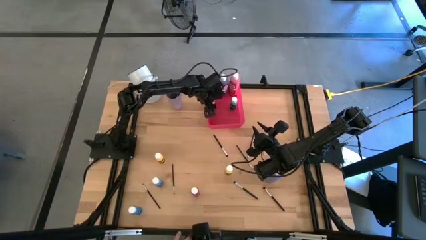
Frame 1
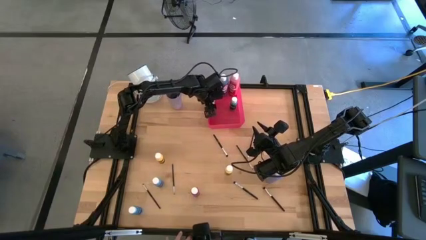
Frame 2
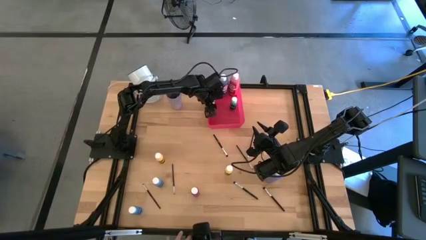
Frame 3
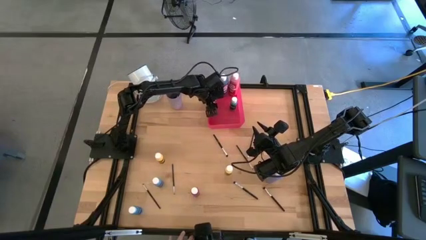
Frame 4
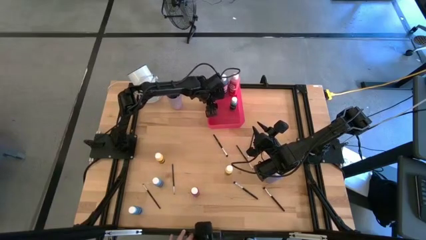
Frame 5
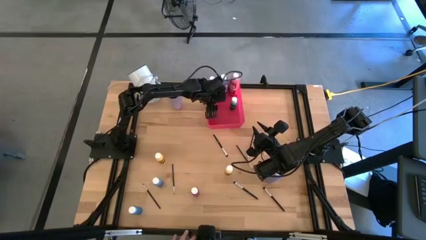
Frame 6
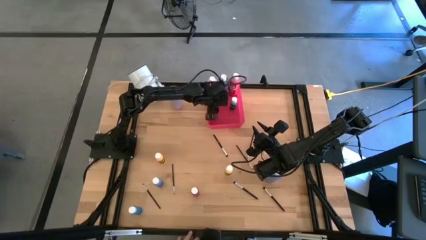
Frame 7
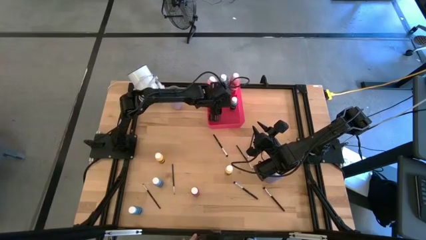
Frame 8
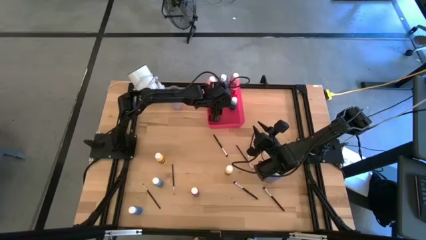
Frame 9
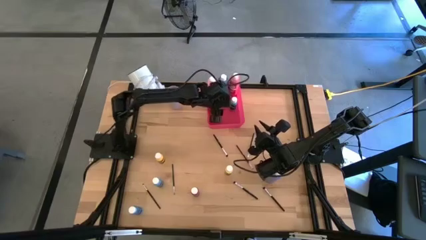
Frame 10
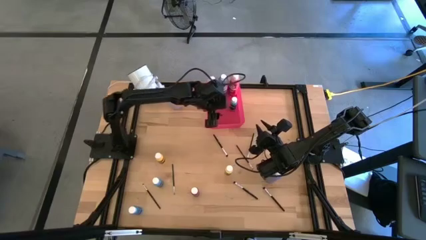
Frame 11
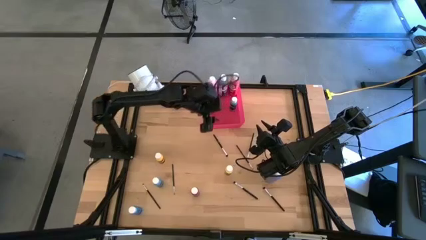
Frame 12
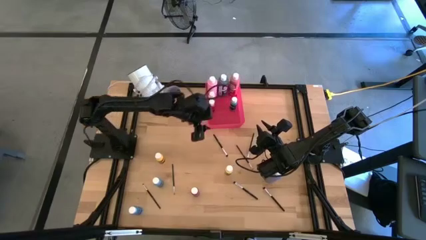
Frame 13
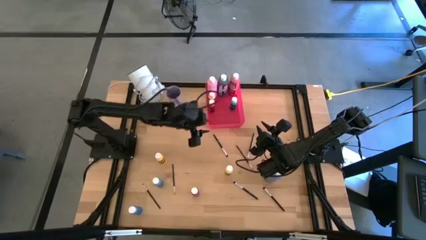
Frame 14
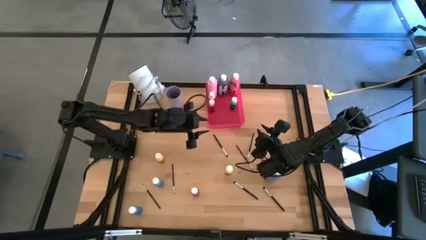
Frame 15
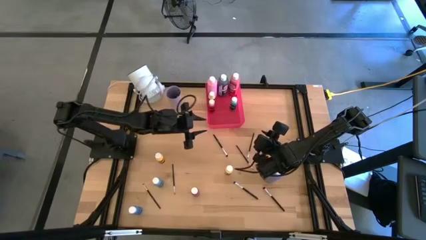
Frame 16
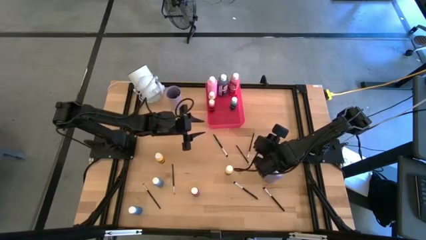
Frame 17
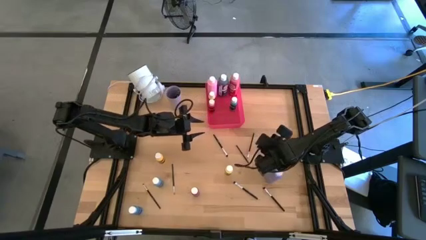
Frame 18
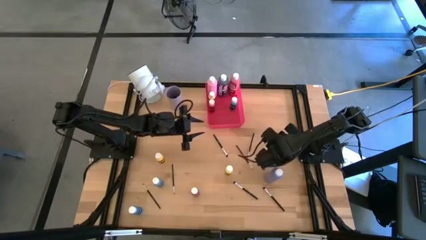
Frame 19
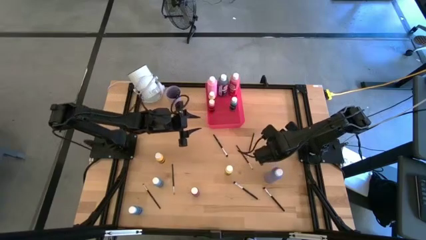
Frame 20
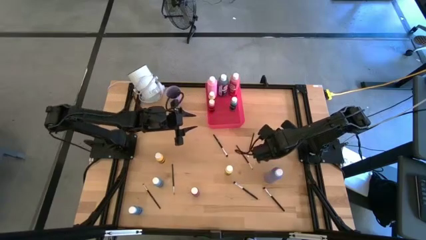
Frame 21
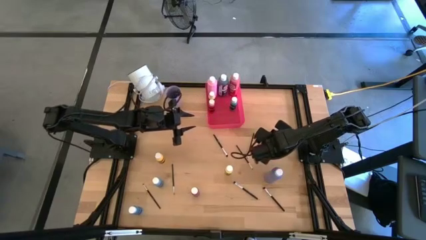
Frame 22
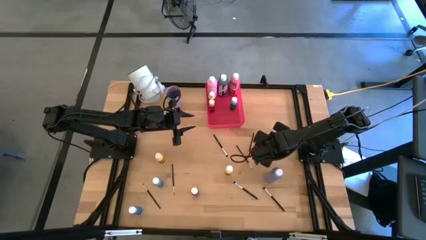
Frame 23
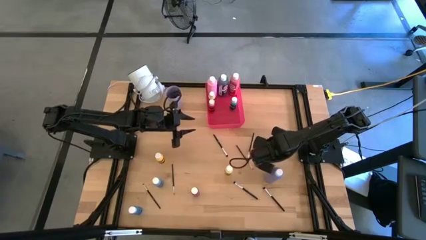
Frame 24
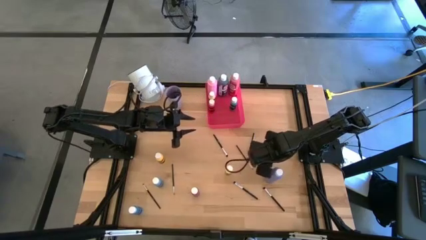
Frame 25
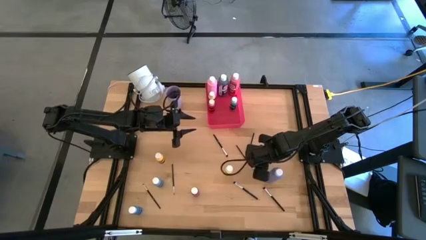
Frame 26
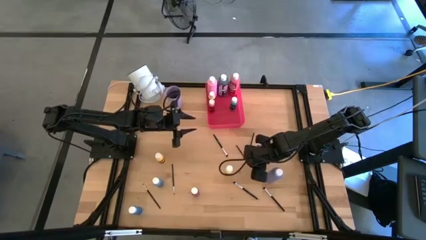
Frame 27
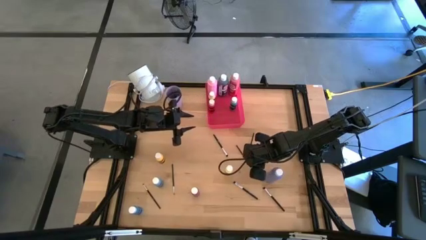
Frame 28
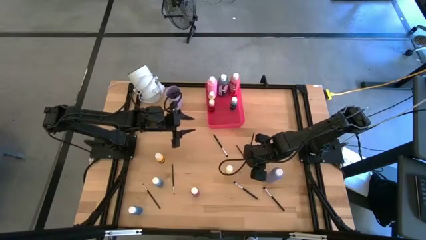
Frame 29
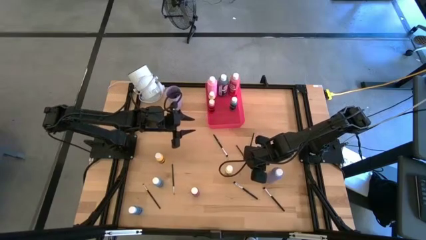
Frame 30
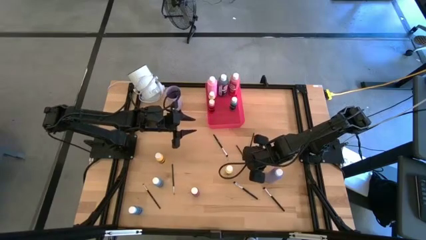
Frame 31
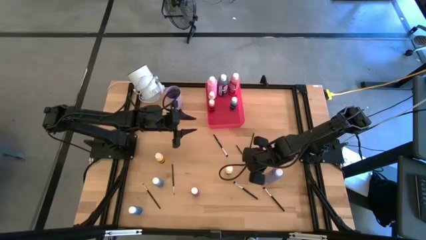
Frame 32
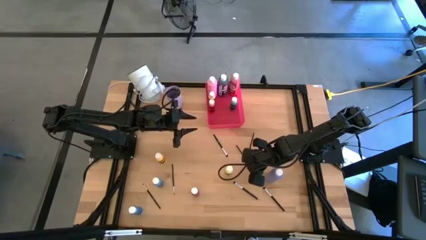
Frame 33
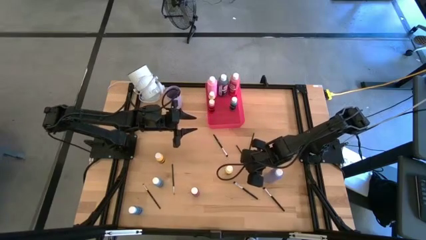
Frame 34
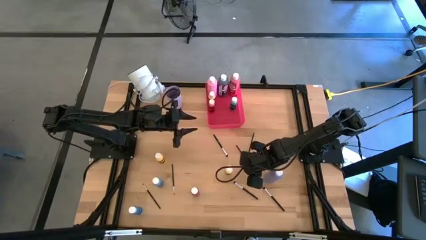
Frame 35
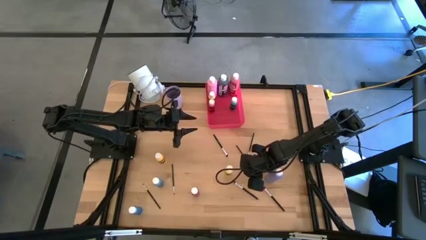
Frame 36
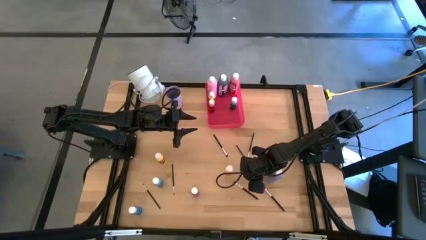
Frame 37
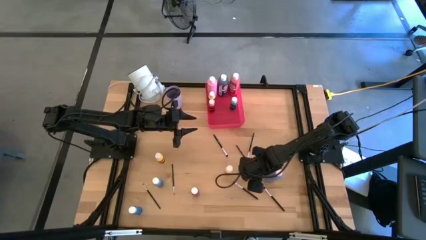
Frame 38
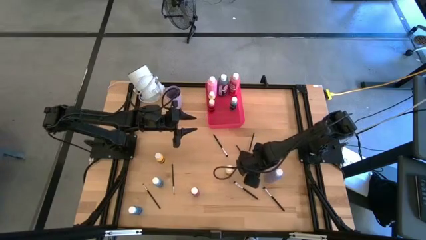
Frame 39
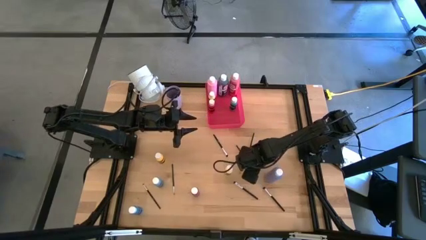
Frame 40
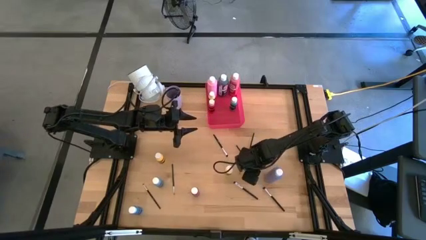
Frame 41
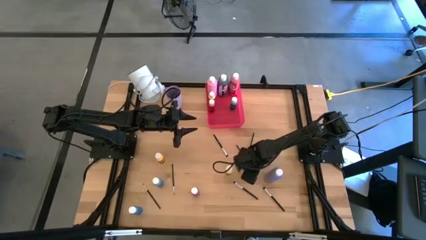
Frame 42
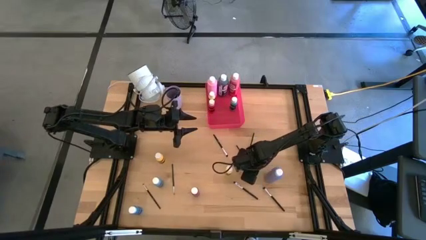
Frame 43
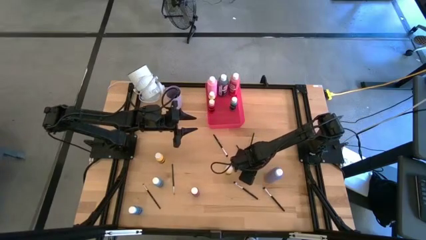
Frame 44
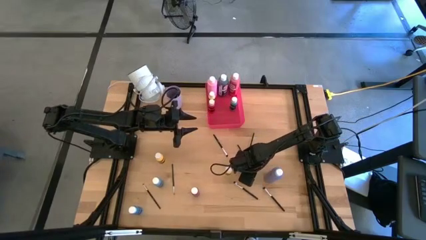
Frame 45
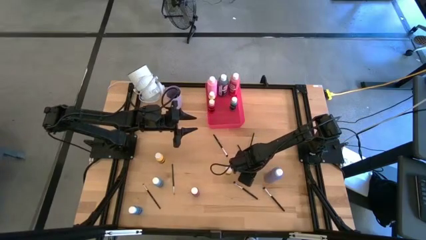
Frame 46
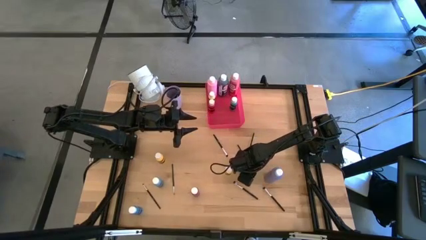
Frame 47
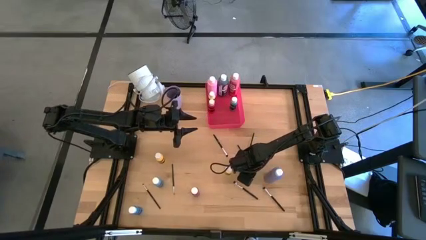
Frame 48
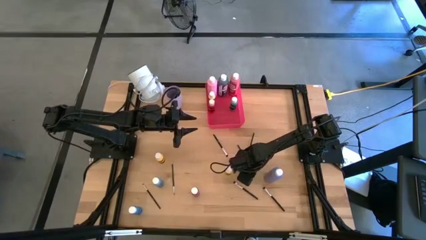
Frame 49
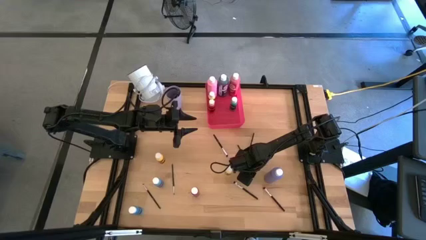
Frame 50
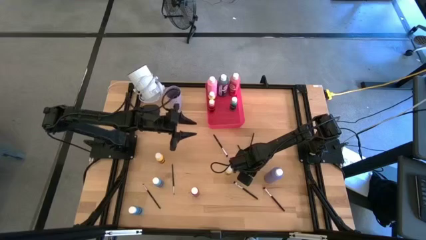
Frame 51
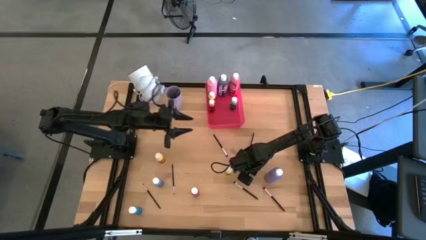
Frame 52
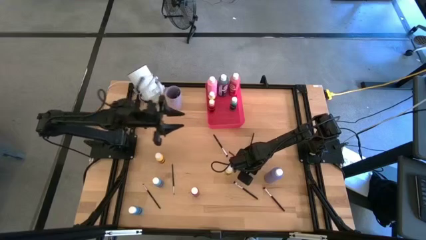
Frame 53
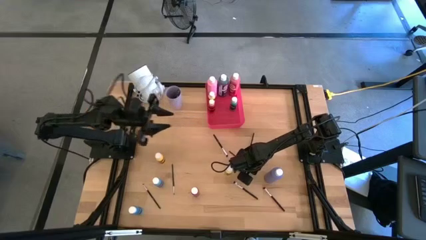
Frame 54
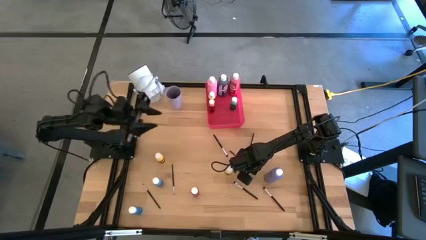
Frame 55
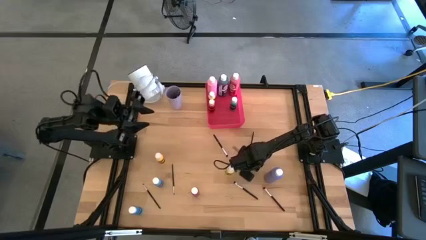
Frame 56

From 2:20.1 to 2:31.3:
Task: Pick & Place Paint Supplies
Put the black paint brush into the purple cup

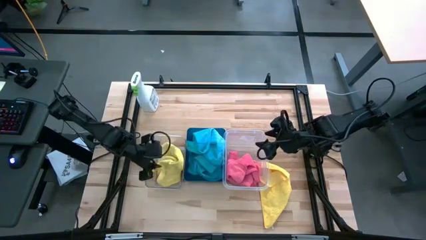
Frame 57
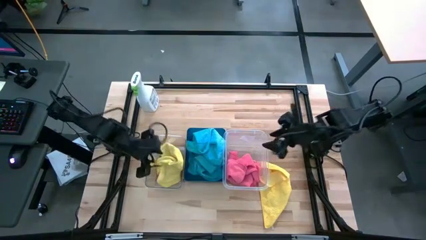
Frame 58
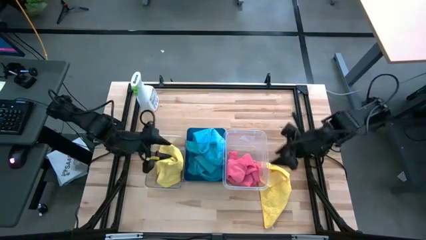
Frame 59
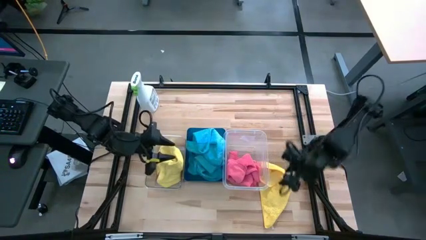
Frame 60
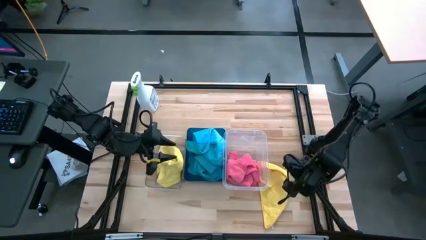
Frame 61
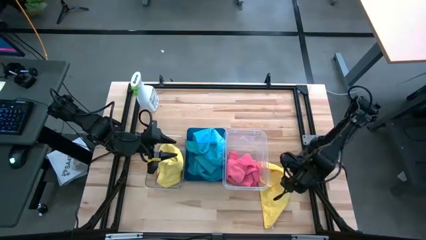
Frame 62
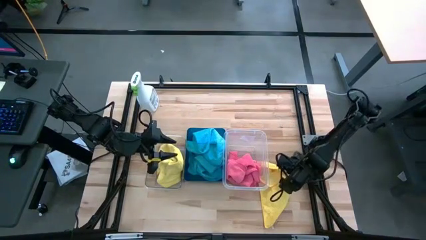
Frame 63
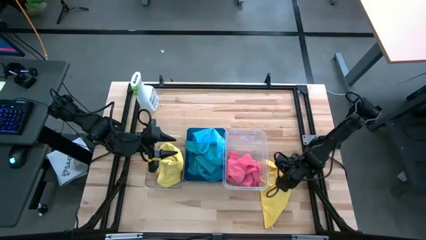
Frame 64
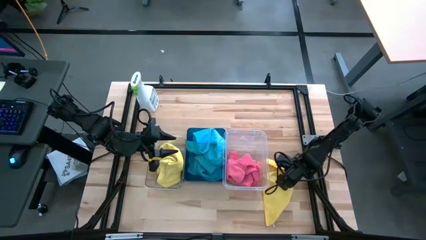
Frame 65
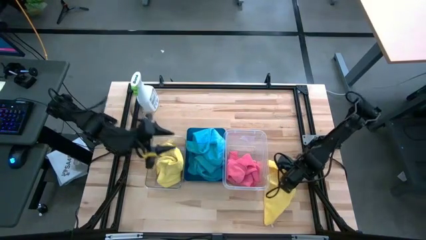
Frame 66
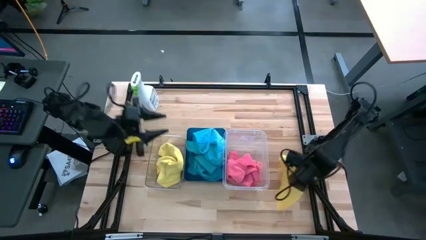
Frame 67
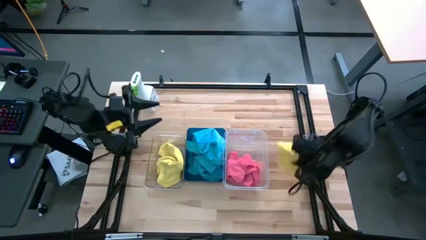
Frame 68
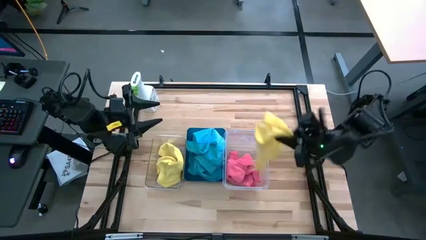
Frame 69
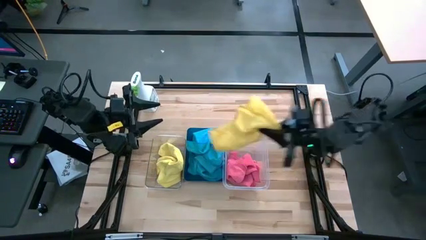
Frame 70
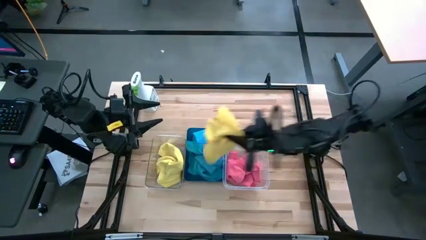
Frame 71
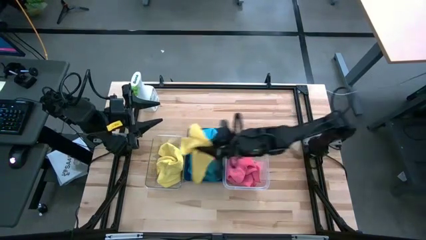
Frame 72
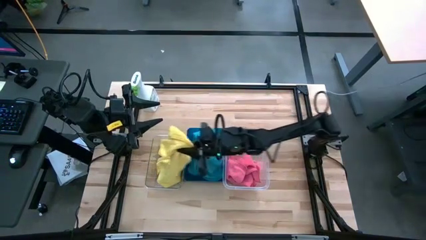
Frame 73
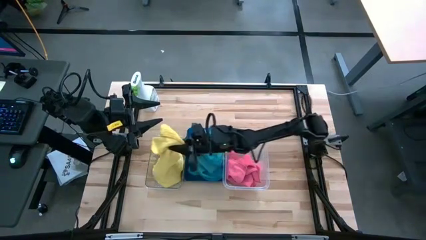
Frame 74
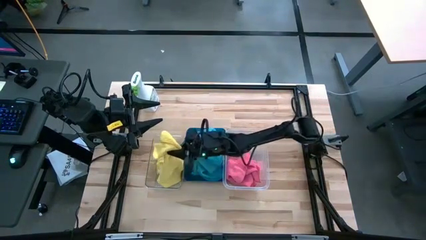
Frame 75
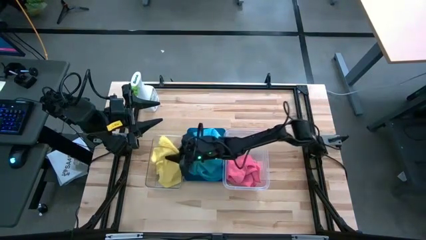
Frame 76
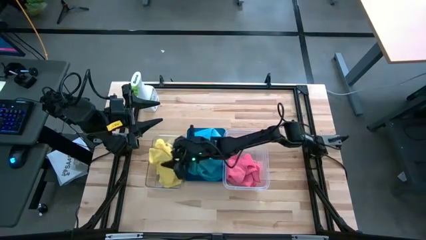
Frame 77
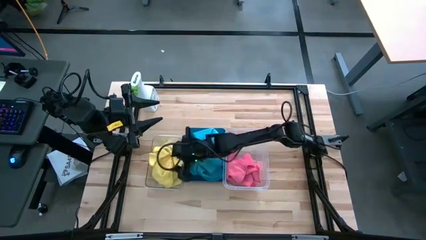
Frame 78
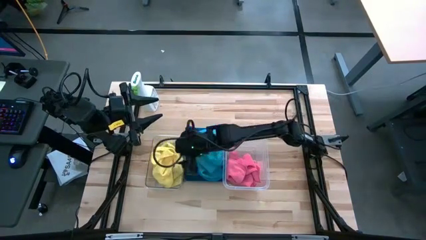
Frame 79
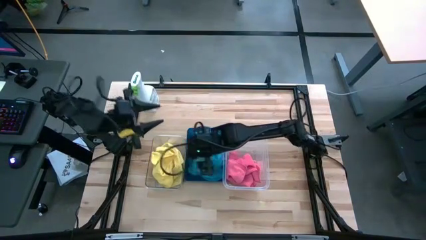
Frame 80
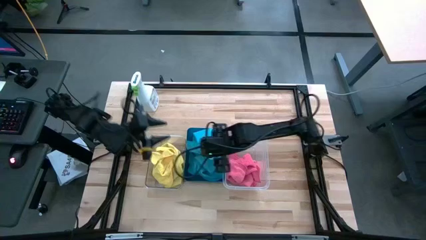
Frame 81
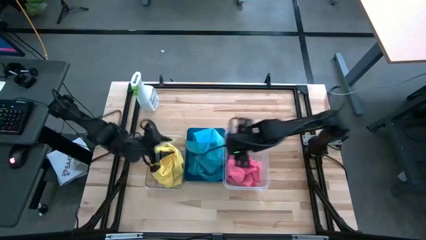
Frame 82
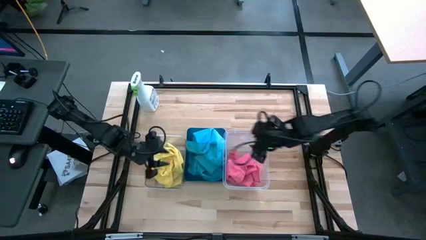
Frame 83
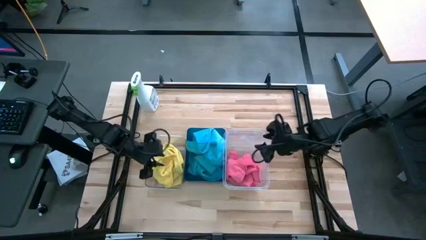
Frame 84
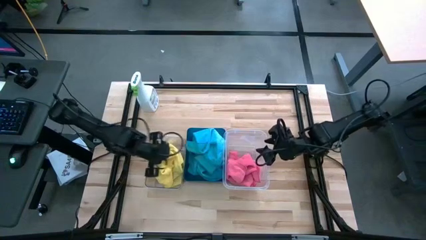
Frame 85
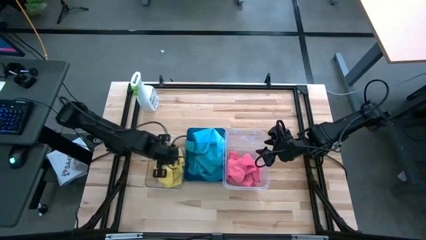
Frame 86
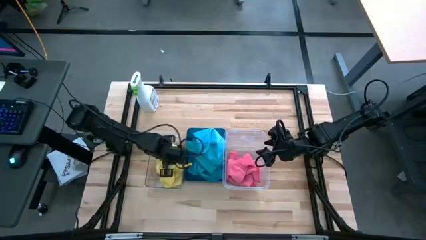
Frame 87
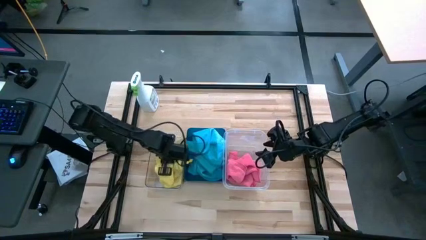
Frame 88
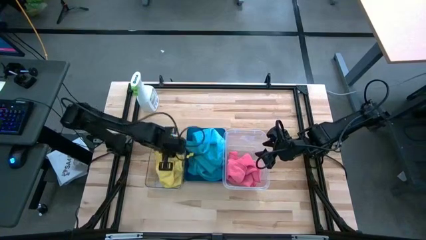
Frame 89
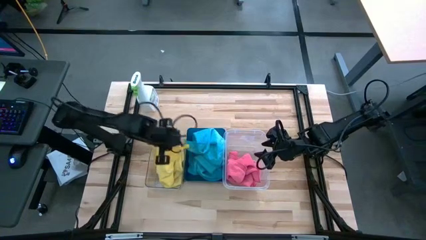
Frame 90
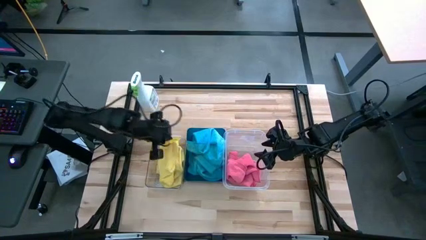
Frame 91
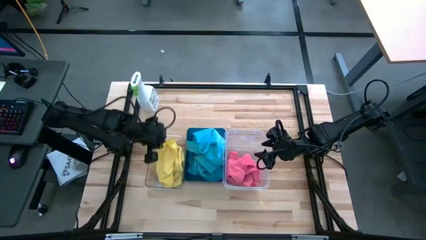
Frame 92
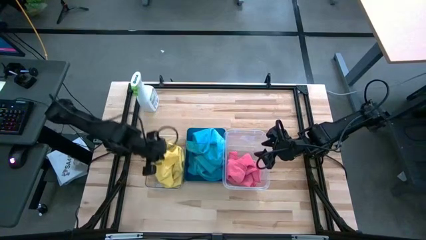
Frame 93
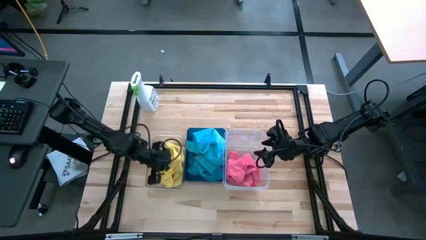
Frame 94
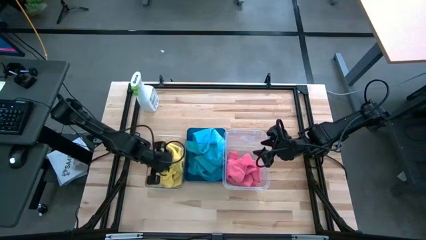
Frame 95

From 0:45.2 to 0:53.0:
Task: Sort microfiber towel by color & place in baskets
Put the yellow microfiber cloth into the left transparent bin
